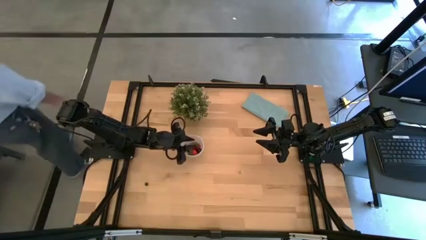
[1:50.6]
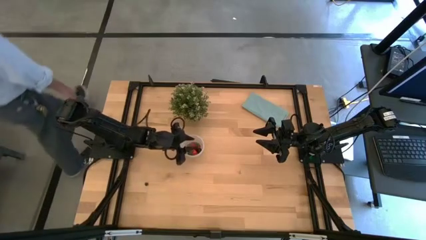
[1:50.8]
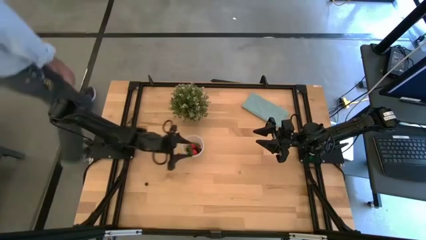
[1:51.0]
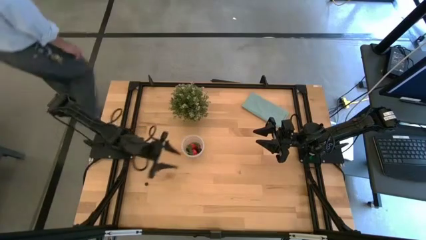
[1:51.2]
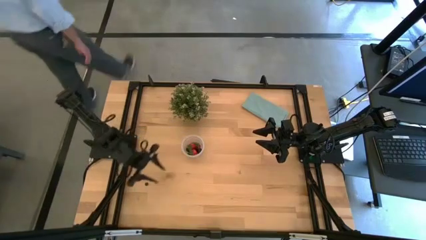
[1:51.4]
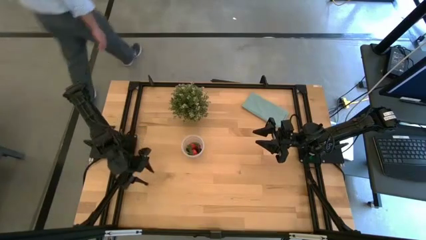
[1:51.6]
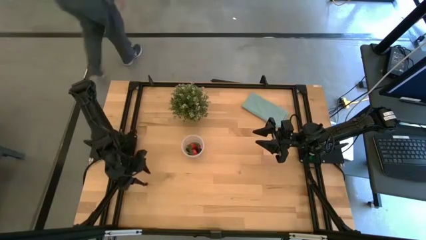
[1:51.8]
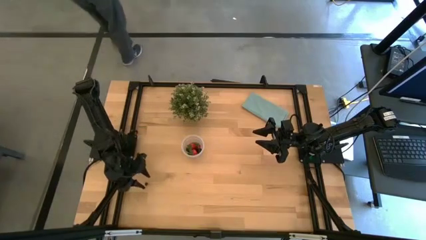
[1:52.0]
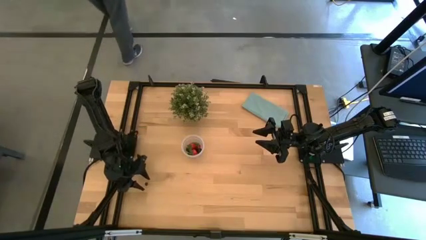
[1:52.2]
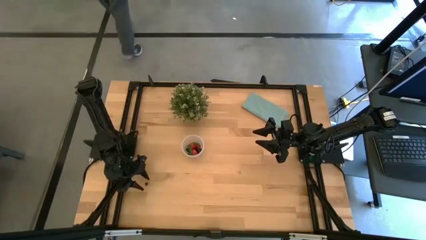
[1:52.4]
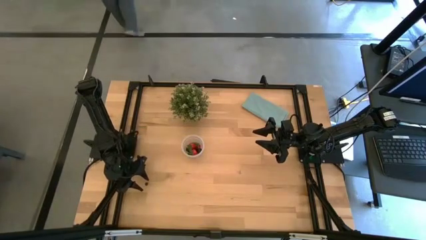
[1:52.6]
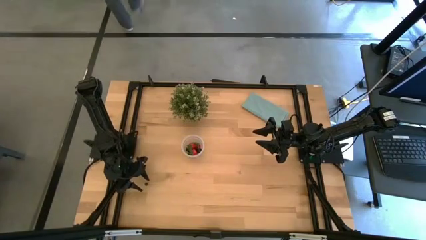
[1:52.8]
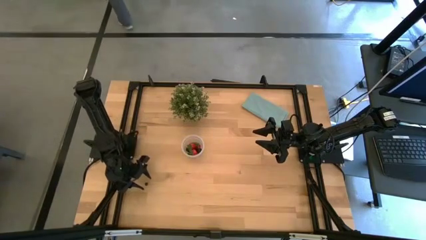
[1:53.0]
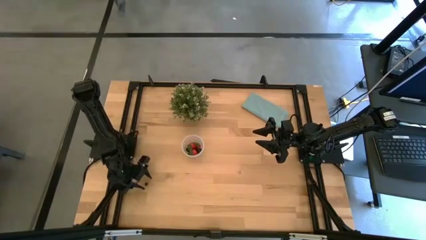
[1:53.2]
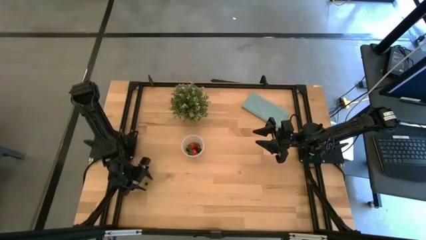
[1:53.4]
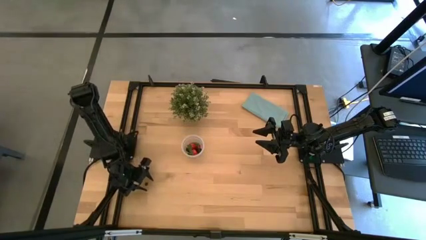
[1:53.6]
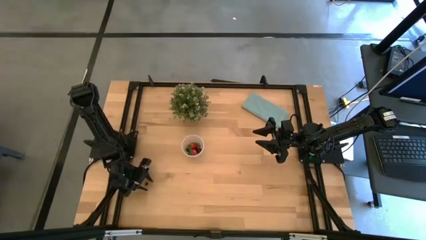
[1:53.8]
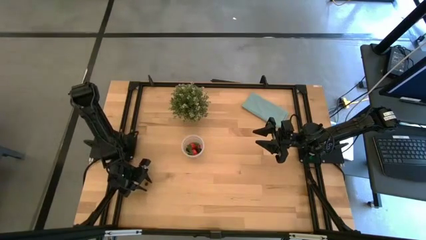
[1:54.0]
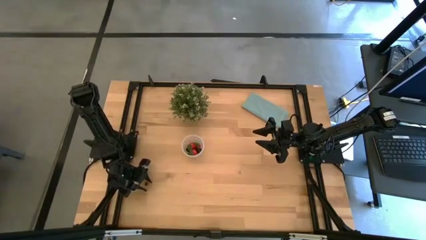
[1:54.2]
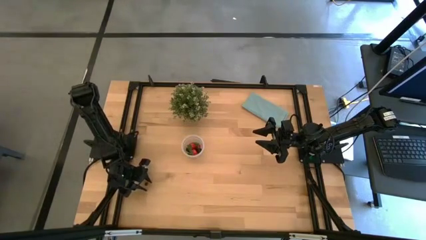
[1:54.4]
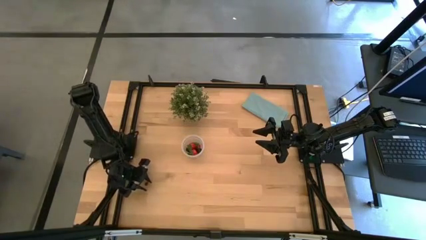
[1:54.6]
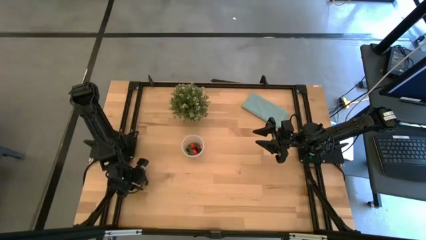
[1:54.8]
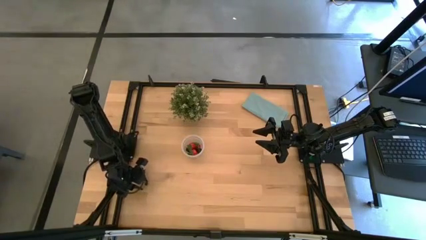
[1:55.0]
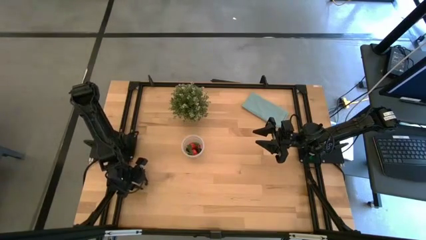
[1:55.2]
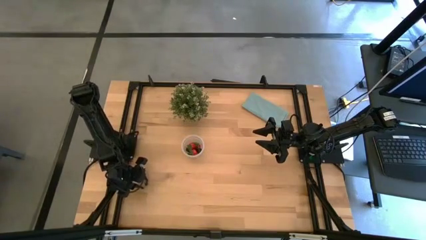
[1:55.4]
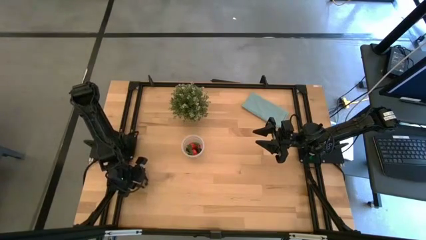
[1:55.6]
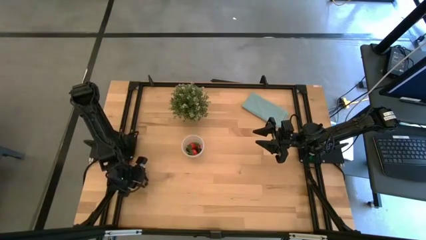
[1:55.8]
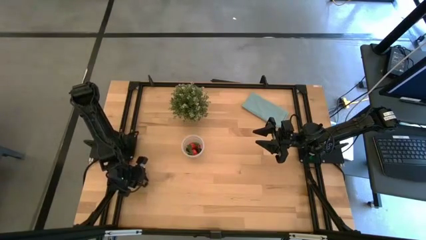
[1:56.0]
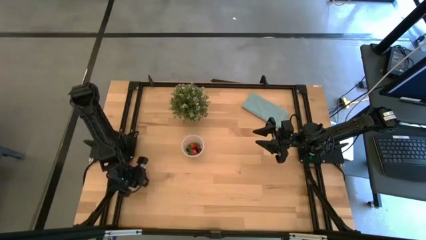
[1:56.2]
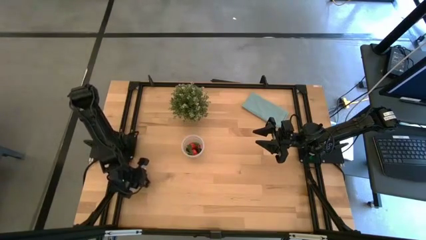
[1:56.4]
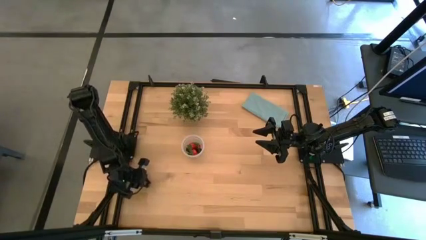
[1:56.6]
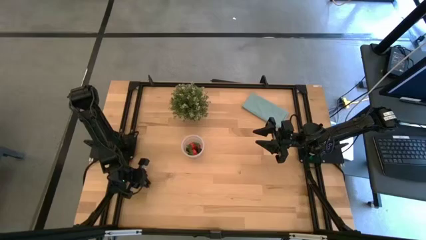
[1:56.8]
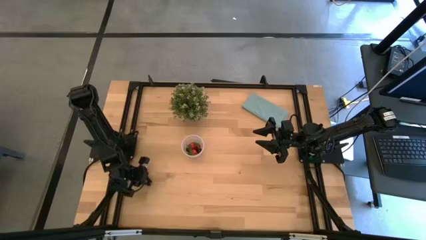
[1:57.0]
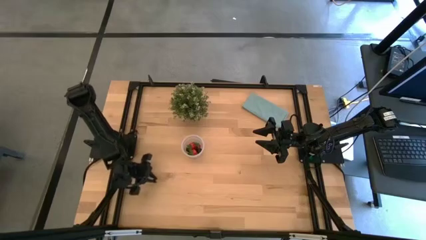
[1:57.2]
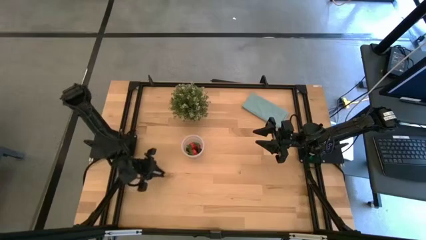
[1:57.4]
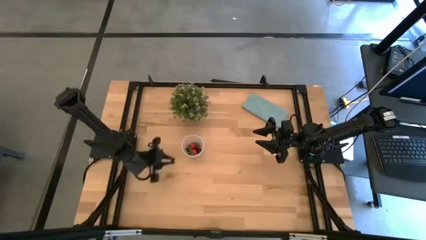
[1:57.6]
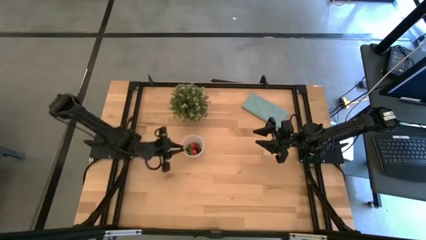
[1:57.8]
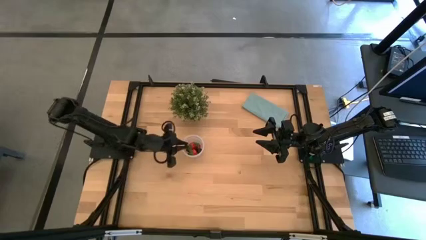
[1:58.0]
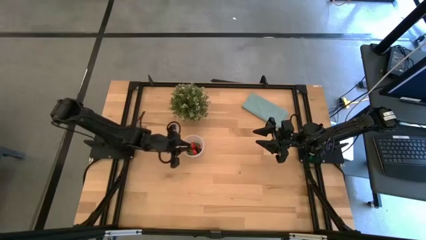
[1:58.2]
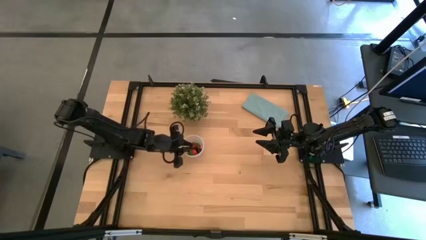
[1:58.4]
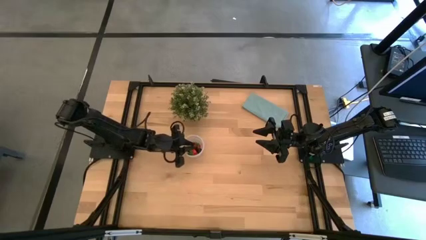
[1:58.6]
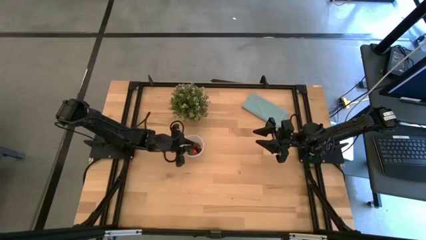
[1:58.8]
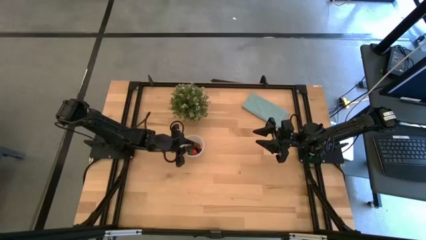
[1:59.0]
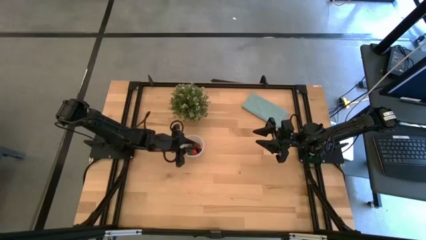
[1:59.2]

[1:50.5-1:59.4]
Task: Pick and placing Produce into tupperware
Put the blueberry into the transparent container

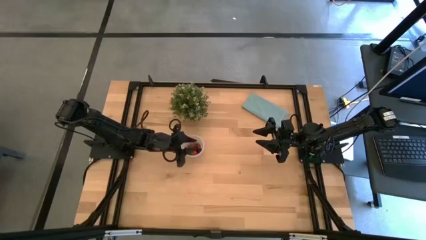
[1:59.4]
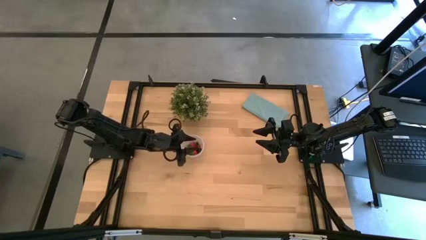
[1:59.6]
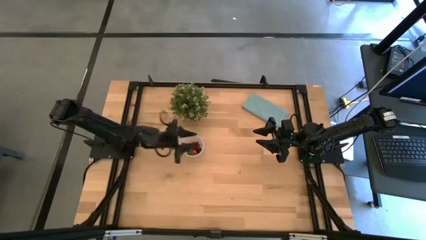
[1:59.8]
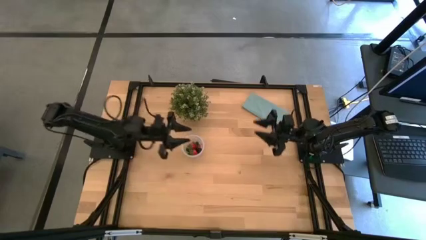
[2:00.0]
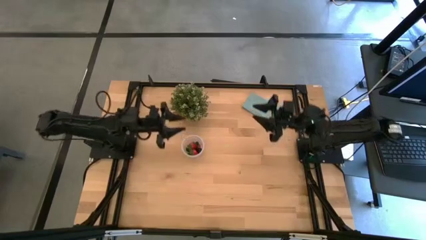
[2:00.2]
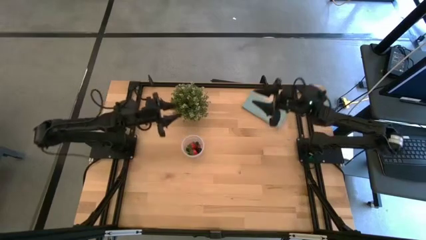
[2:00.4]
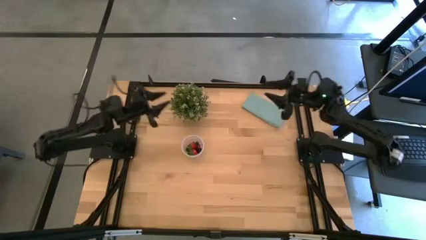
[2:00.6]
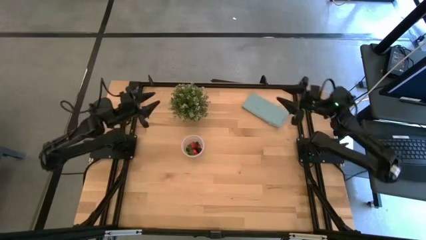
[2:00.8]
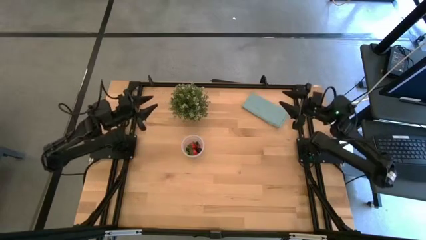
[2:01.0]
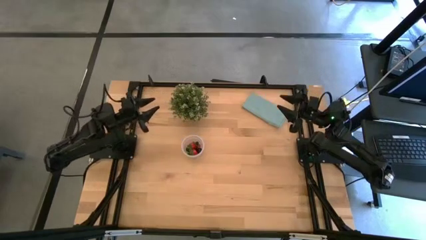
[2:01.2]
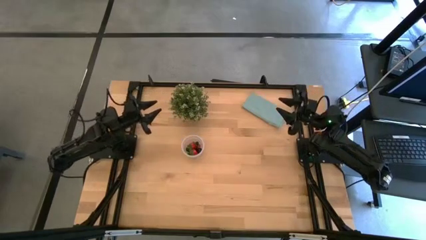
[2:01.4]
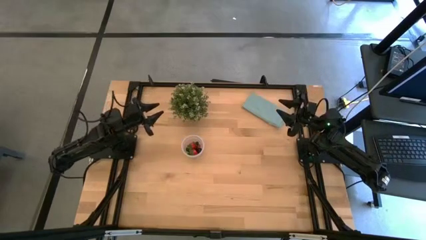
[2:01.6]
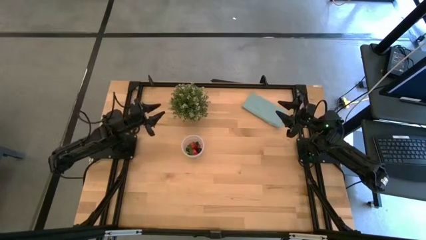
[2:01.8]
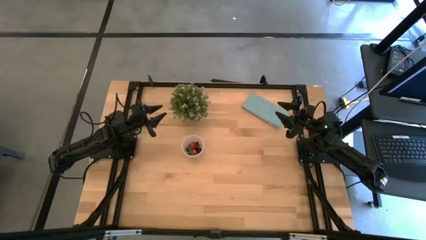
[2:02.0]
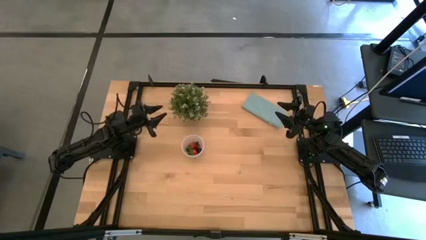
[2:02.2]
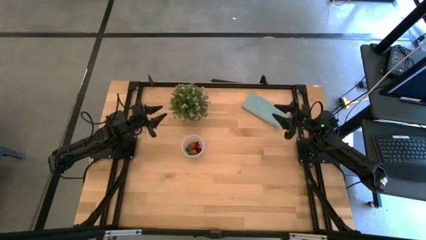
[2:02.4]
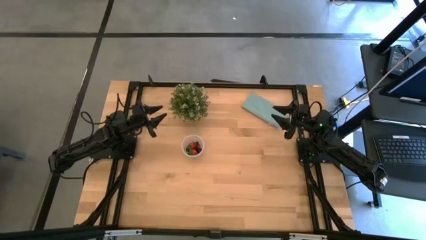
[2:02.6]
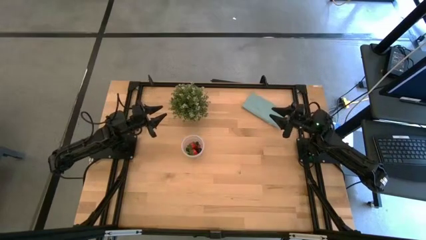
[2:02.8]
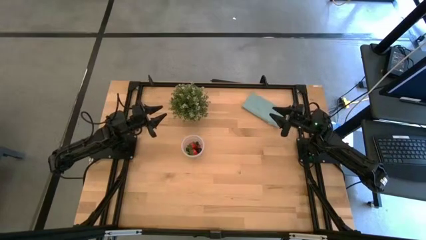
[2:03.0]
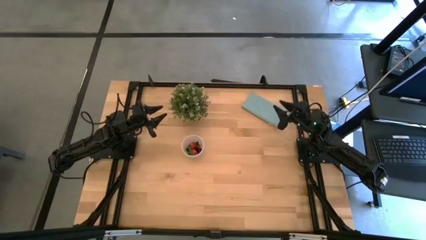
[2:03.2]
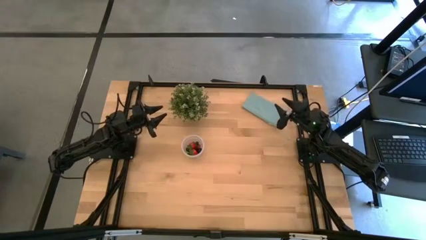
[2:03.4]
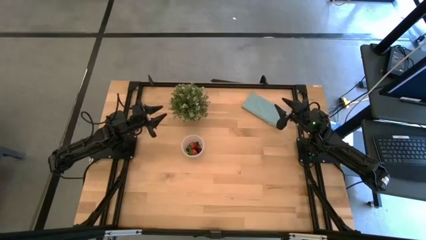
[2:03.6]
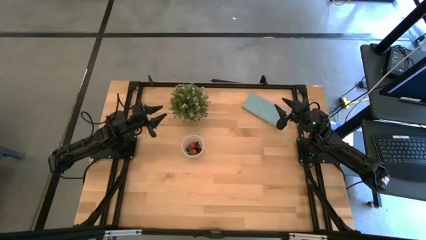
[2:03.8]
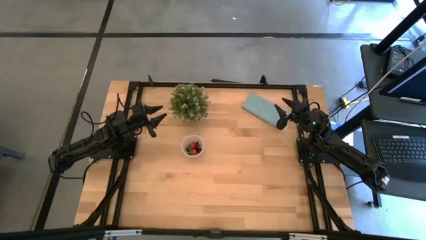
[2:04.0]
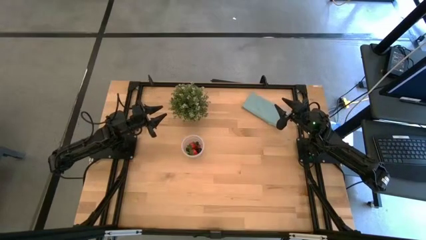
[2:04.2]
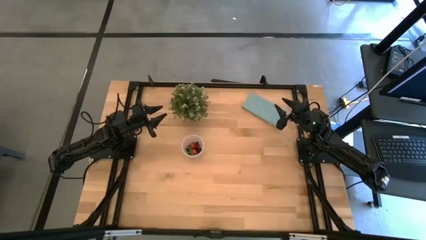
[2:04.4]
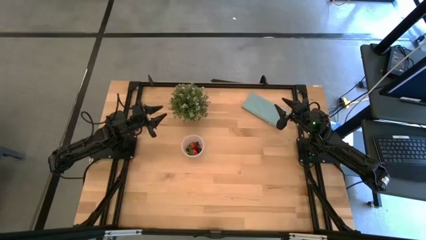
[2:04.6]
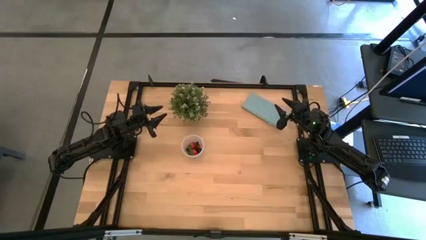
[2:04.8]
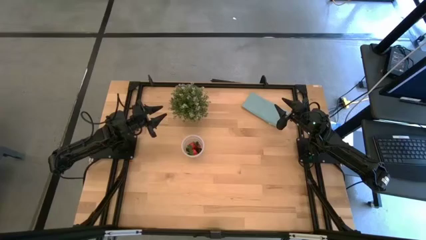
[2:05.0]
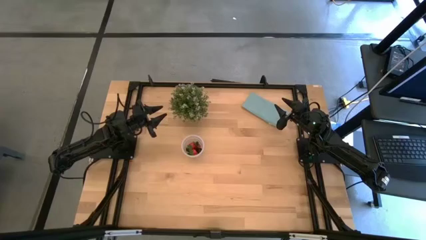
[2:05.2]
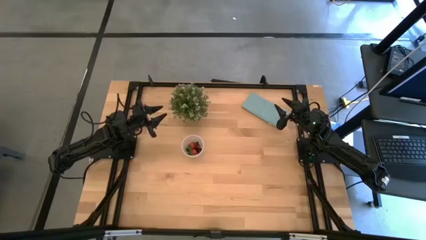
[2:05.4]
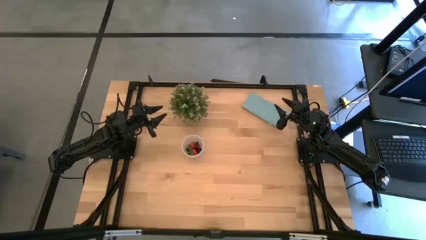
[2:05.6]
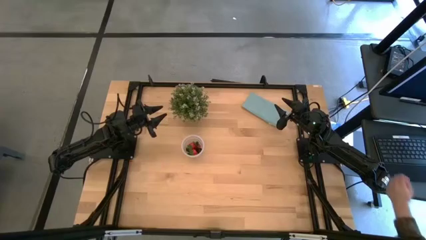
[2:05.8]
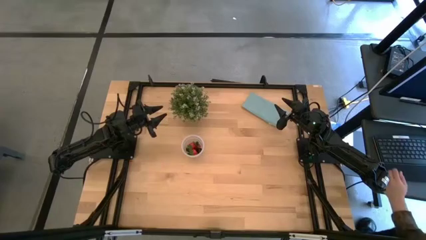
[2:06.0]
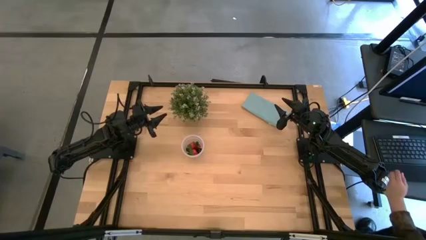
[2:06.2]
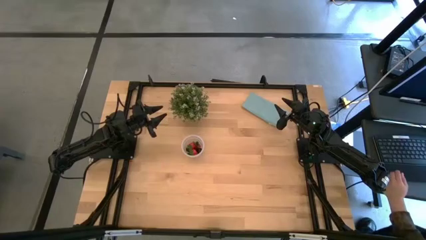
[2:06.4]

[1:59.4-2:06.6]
Return to Home Position

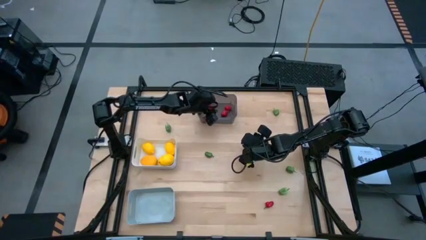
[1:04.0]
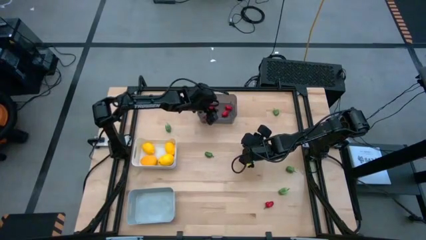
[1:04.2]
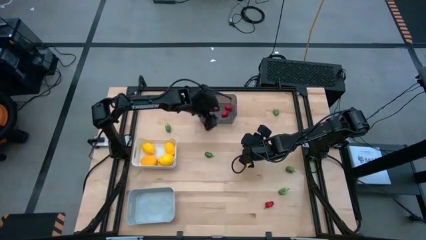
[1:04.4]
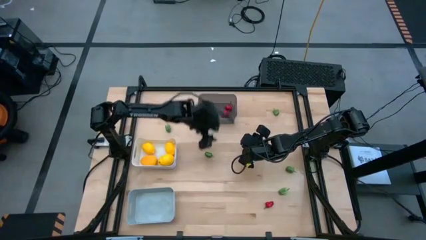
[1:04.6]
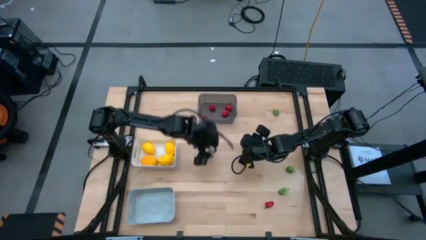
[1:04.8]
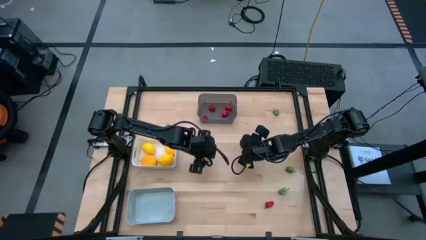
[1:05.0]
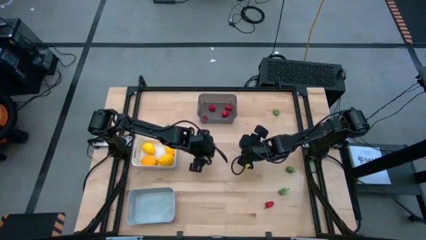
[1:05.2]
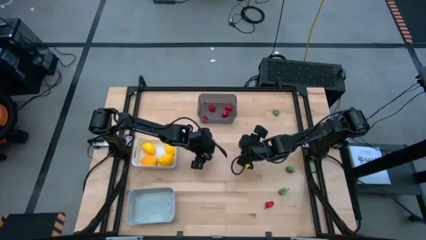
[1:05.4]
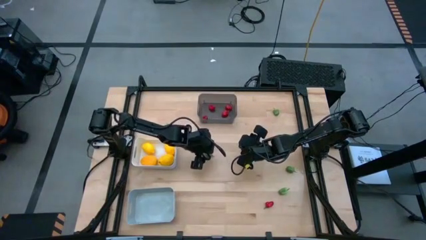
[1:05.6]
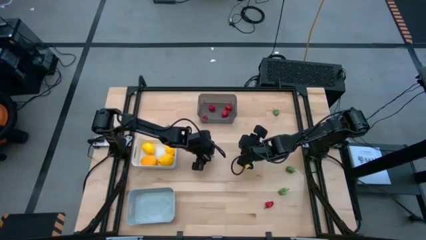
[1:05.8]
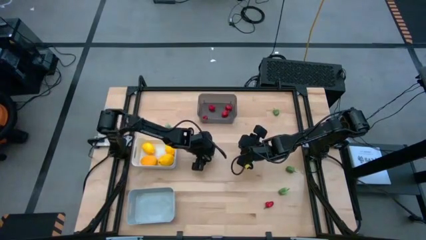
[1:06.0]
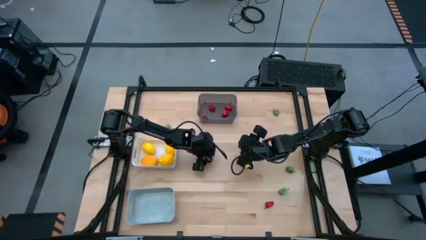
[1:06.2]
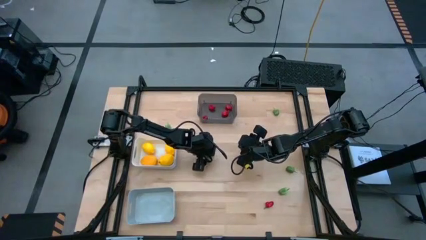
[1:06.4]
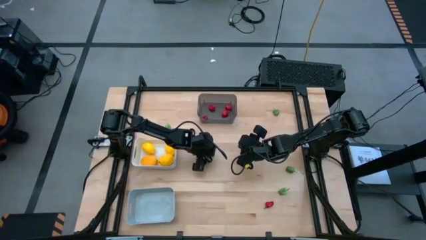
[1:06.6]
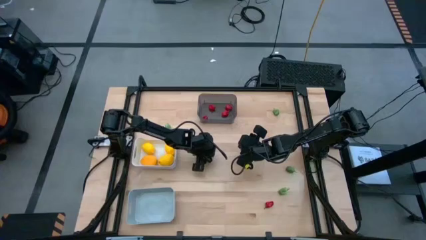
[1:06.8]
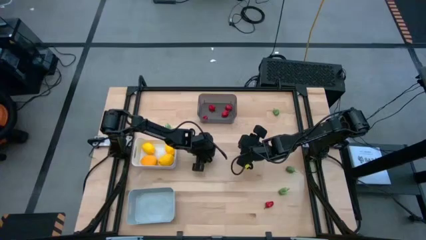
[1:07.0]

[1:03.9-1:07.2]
Task: Sort produce into baskets
Put the green chili pepper into the gray transparent bin
